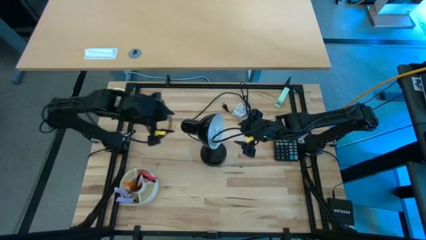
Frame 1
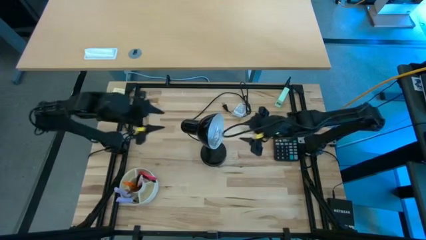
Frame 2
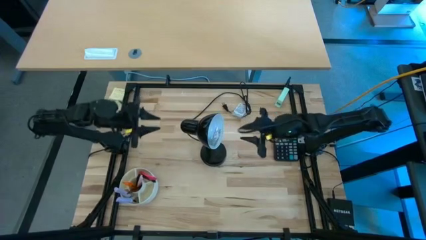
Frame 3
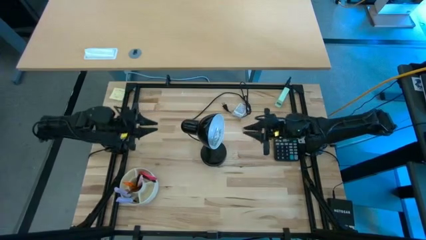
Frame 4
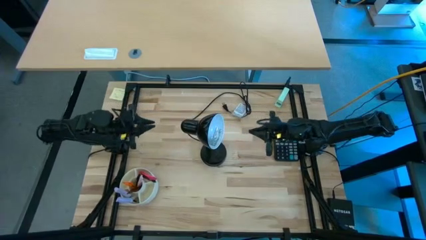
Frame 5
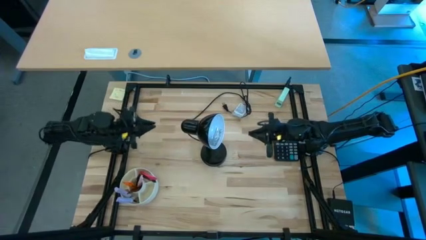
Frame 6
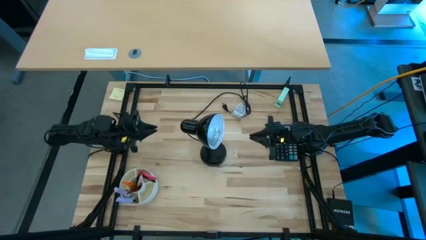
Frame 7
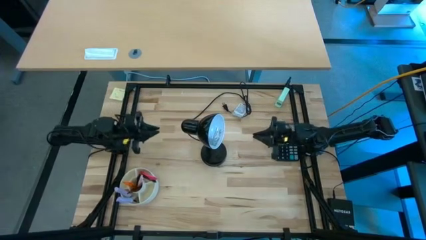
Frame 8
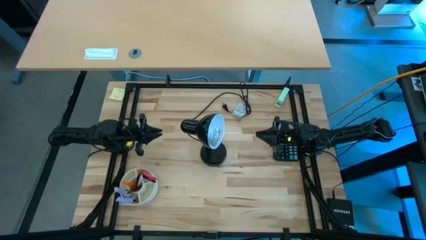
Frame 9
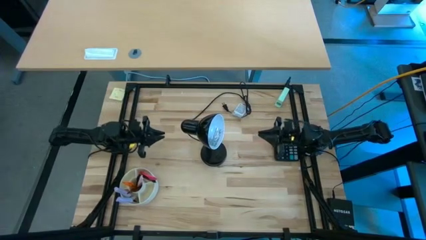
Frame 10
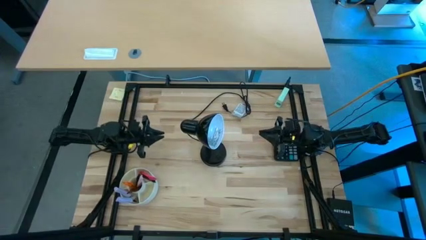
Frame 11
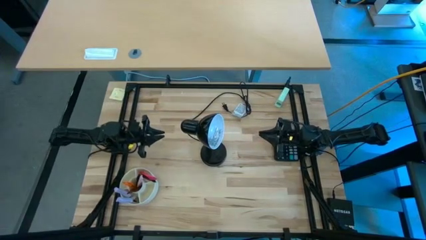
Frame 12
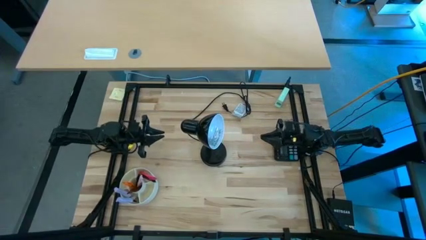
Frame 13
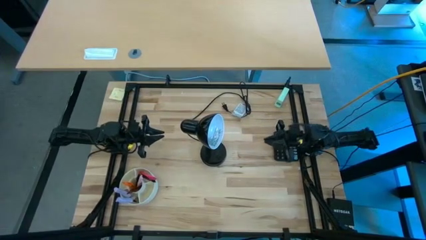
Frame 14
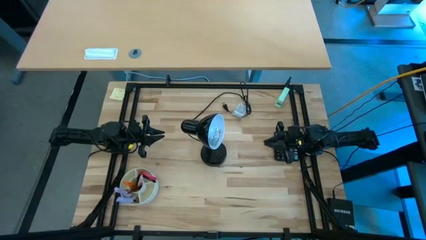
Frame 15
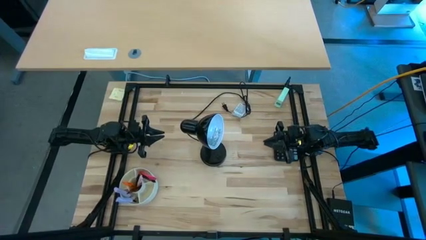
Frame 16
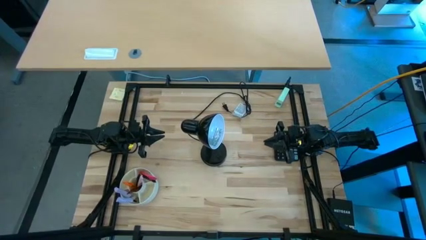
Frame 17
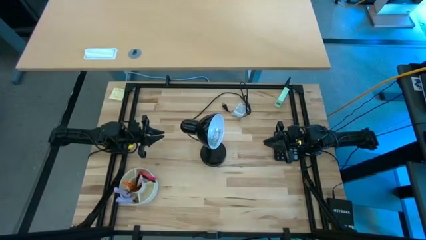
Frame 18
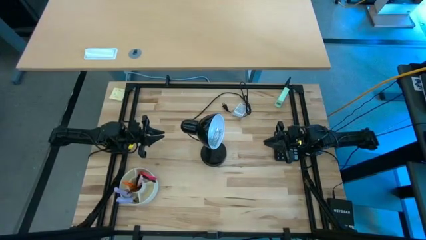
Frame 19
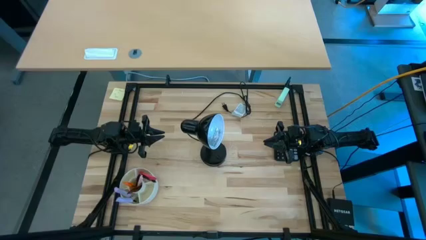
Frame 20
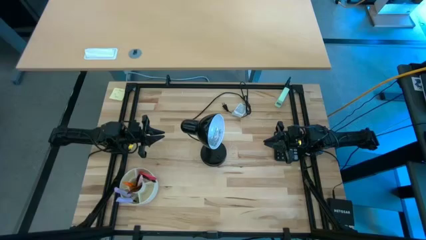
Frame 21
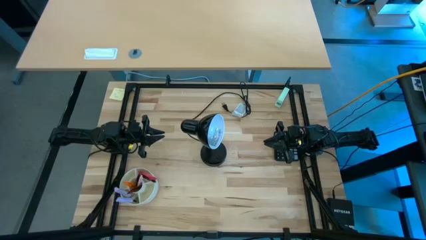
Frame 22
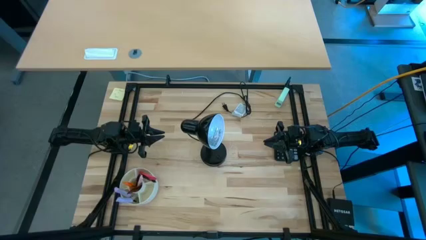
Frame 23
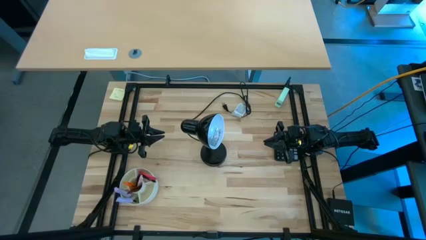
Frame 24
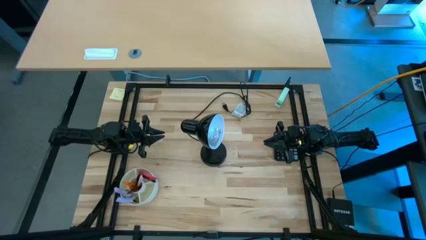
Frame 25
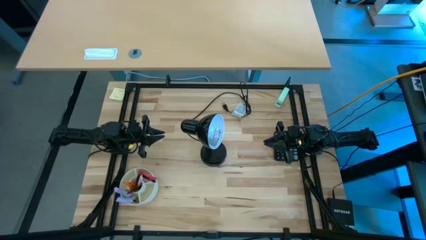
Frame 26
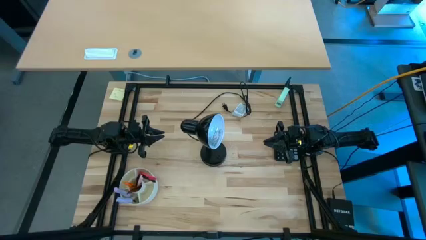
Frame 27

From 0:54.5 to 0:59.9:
Task: Screw lightbulb
Return to Home Position

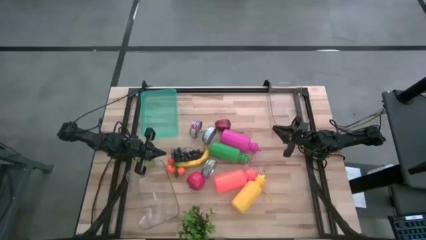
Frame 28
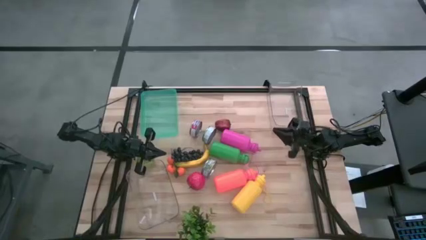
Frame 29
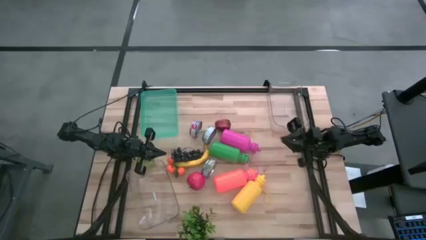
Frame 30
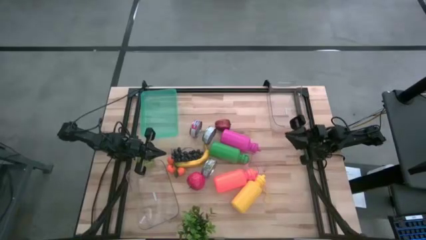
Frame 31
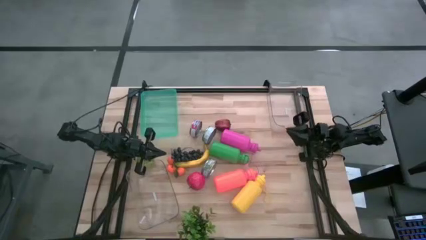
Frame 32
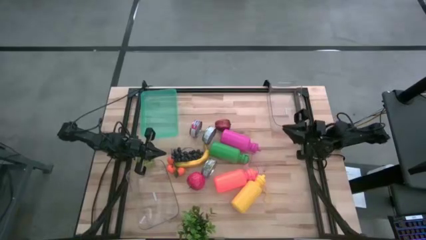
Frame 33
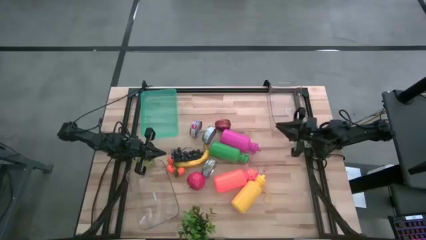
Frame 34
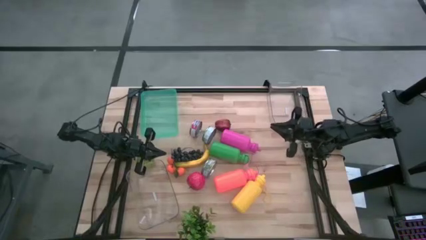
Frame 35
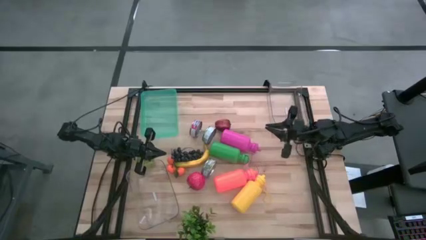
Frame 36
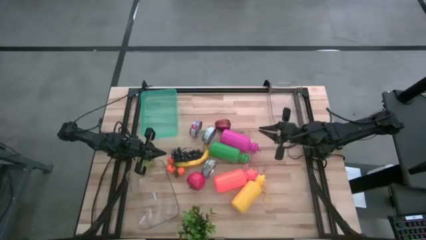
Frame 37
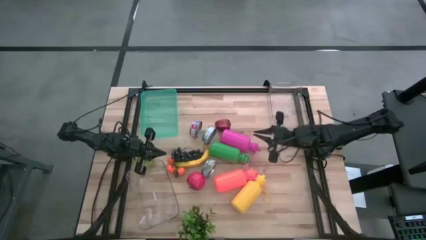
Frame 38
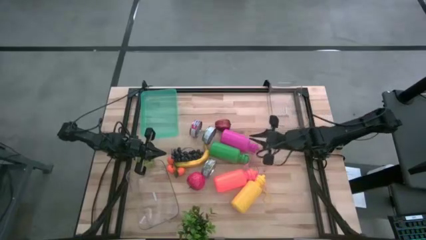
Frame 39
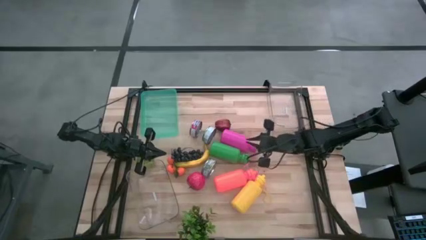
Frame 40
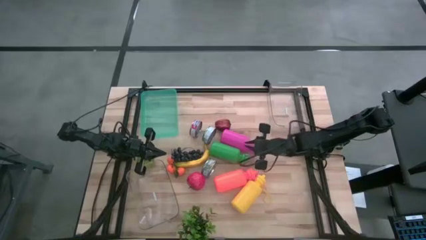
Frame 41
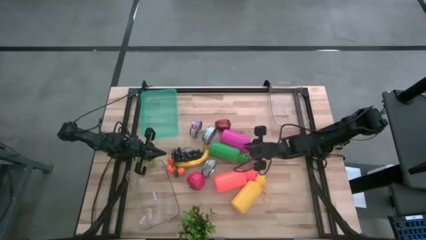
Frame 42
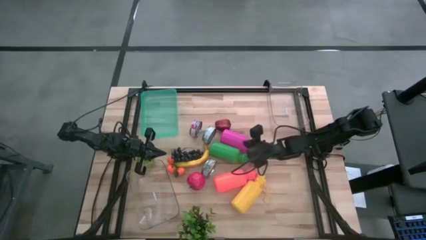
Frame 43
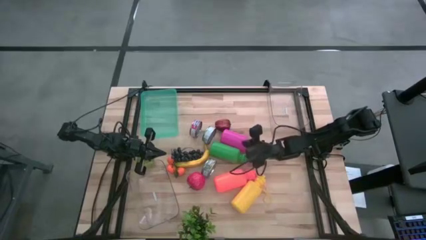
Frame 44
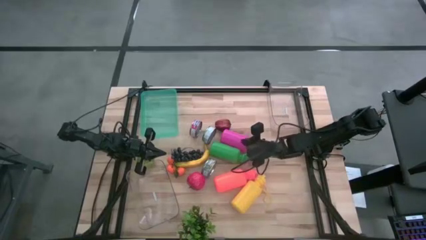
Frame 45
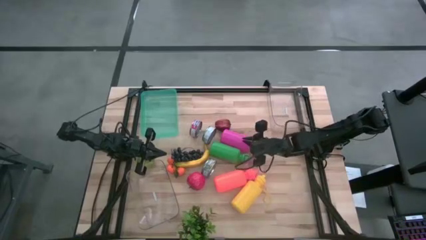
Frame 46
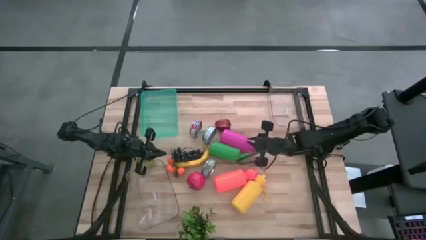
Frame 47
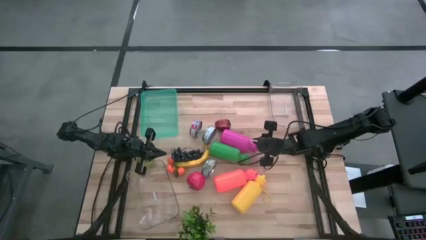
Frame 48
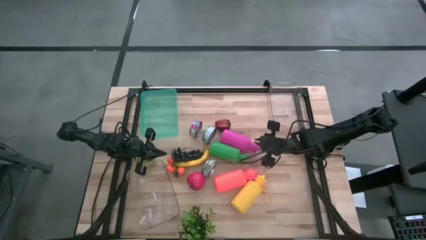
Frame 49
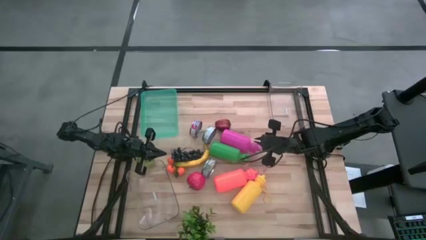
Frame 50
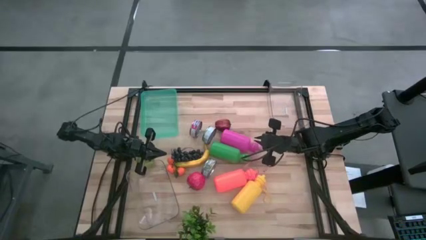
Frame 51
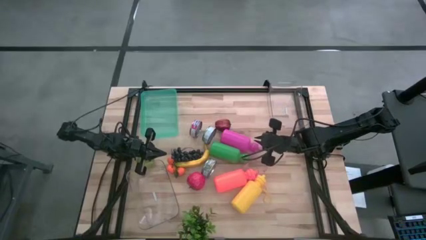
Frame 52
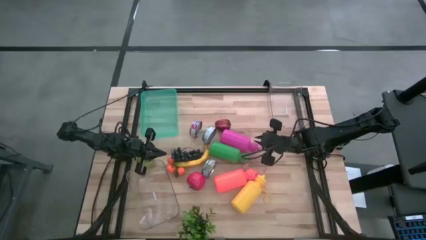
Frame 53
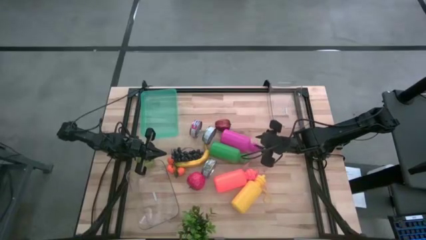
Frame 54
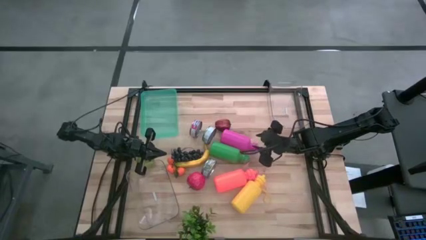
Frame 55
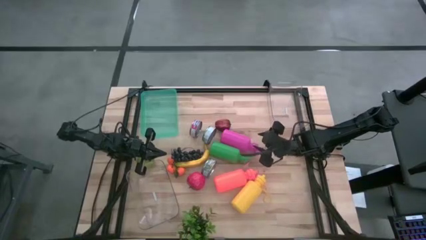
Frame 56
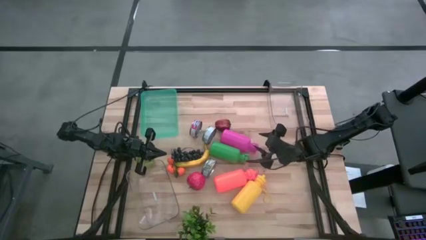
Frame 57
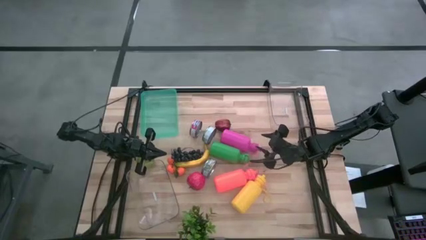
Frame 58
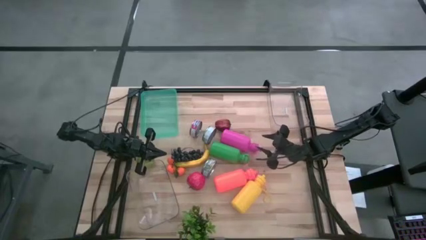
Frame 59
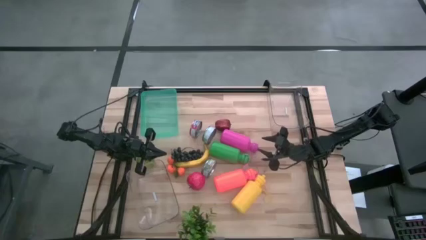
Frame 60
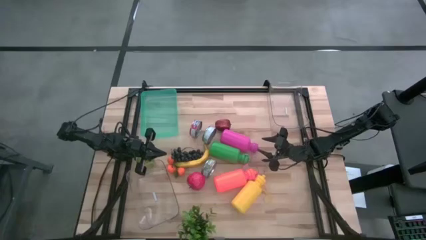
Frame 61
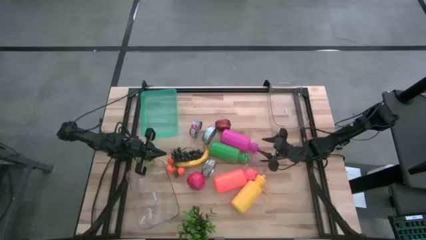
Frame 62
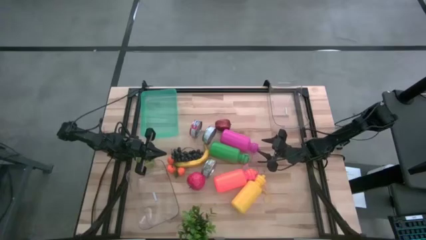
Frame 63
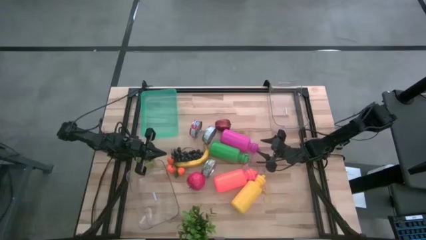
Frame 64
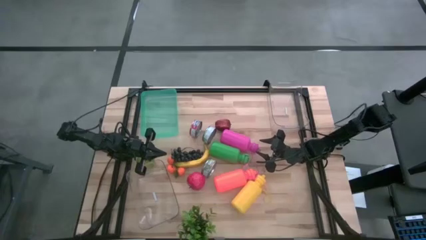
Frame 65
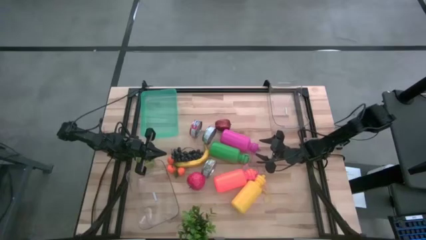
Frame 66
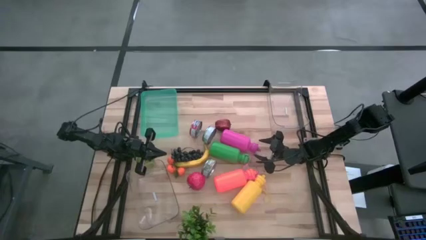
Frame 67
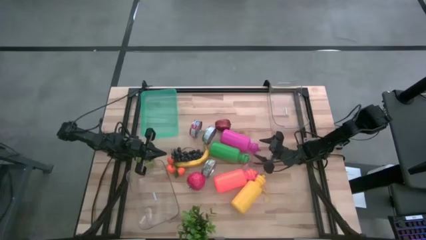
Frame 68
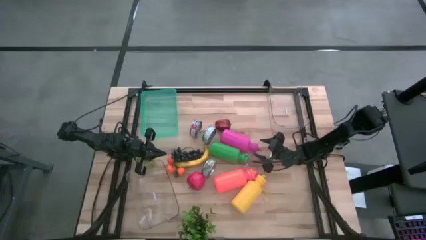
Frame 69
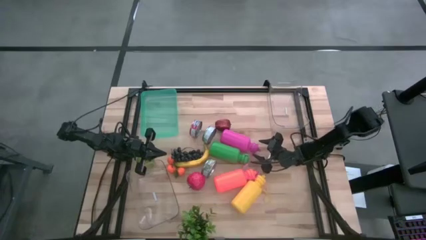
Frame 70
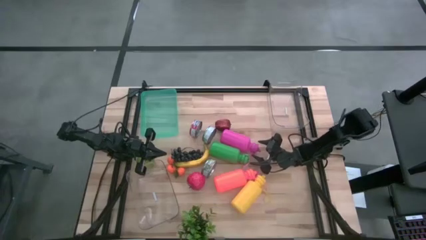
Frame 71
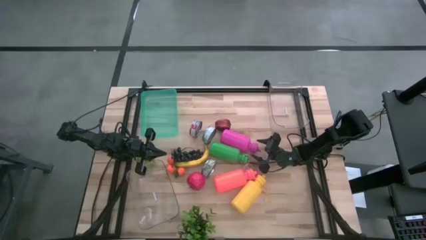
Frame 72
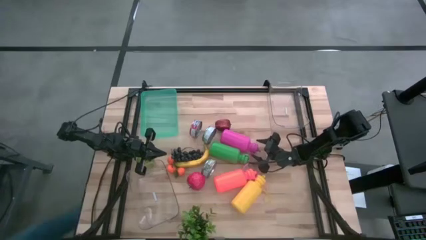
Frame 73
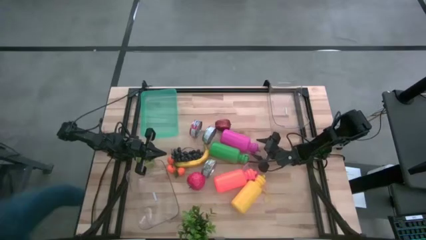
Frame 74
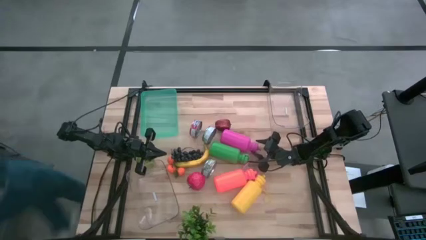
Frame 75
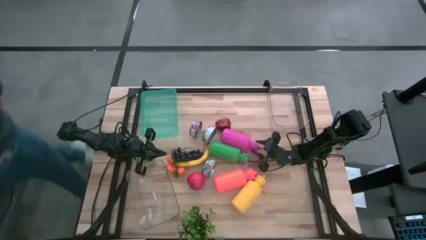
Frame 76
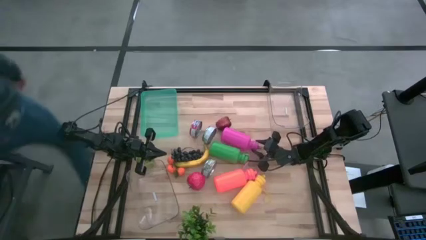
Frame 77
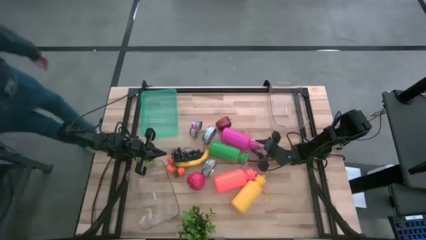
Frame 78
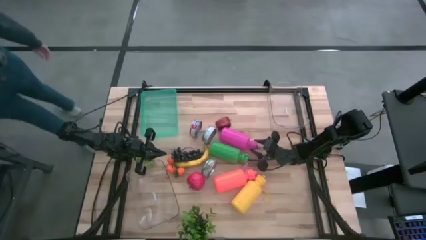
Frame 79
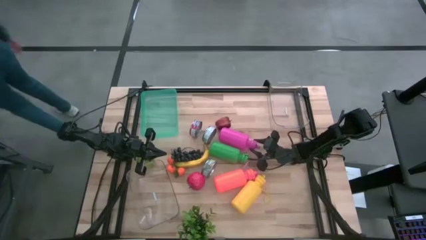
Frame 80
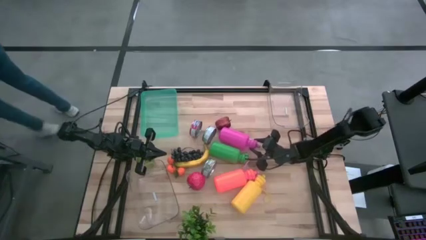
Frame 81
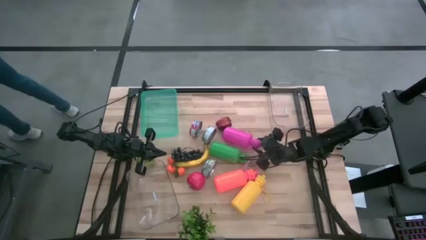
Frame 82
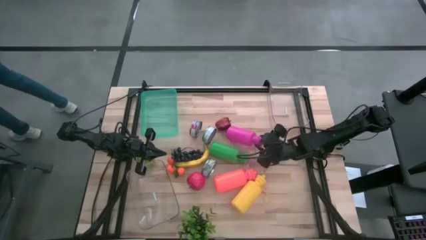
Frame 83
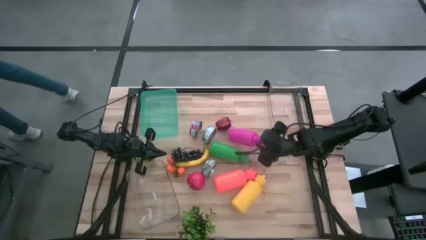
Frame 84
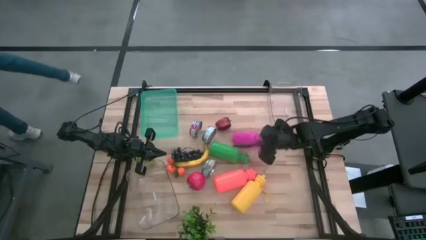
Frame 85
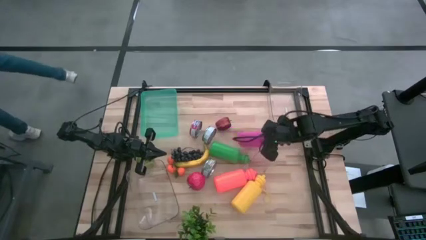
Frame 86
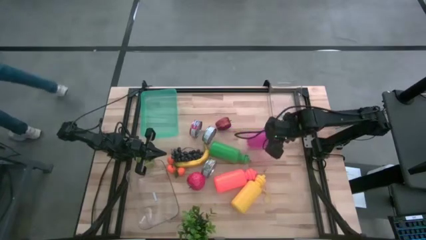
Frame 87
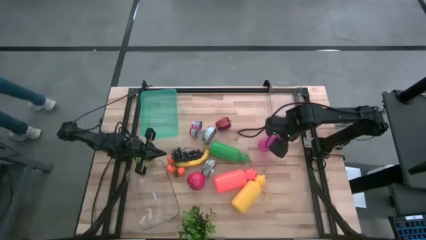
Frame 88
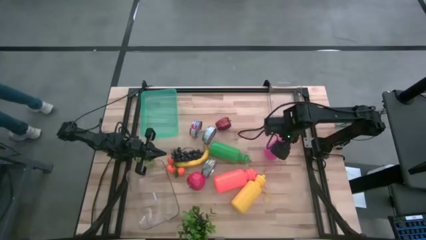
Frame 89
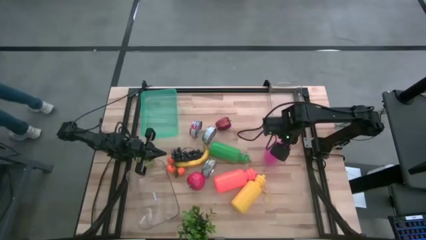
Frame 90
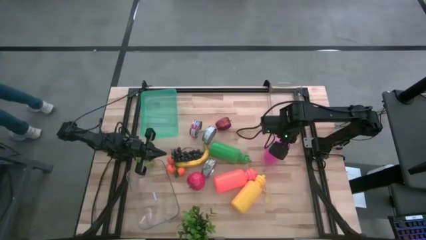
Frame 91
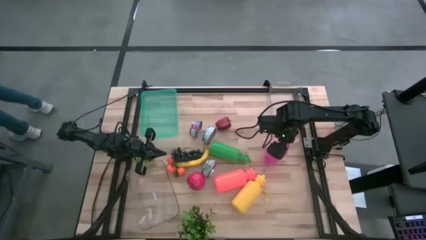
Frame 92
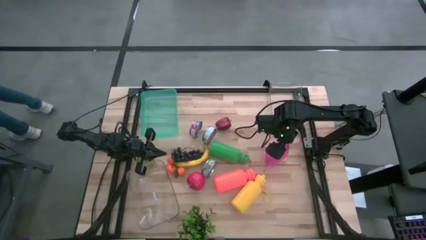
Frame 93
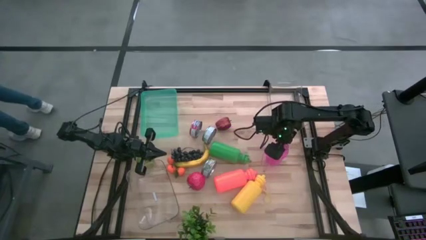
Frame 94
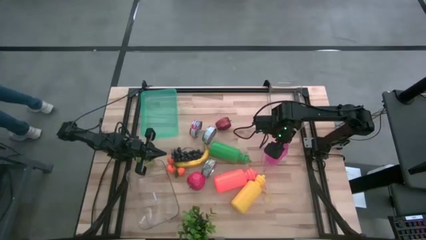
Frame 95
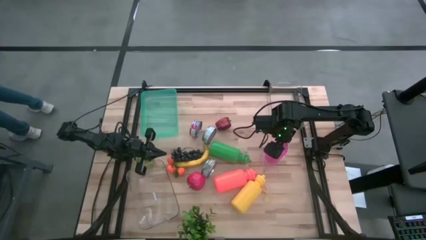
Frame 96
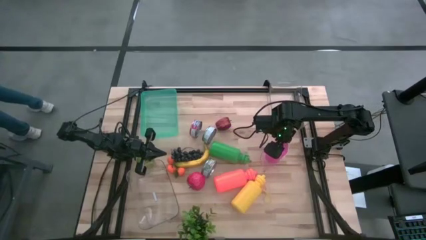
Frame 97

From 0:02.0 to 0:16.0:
Task: Pick & Place Food Item
Put the pink tumbler bottle into the top right transparent bin
